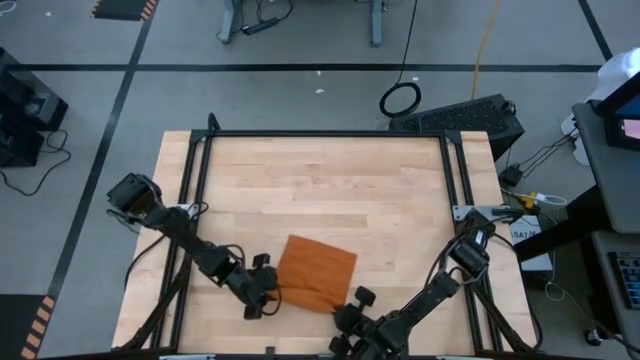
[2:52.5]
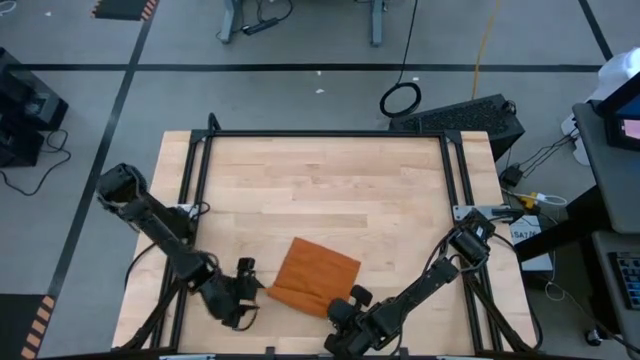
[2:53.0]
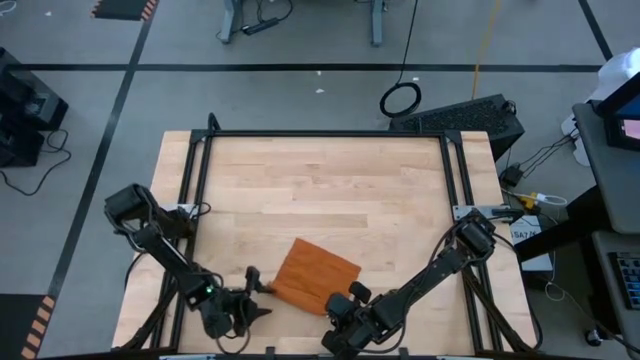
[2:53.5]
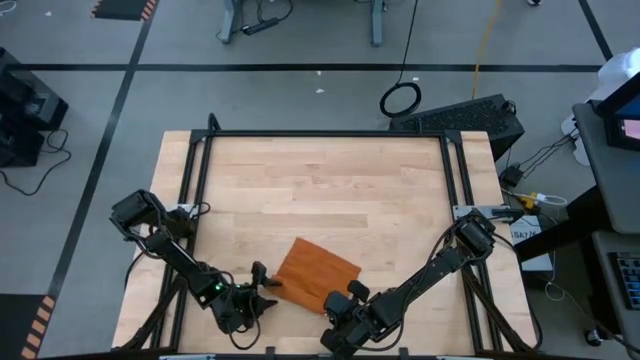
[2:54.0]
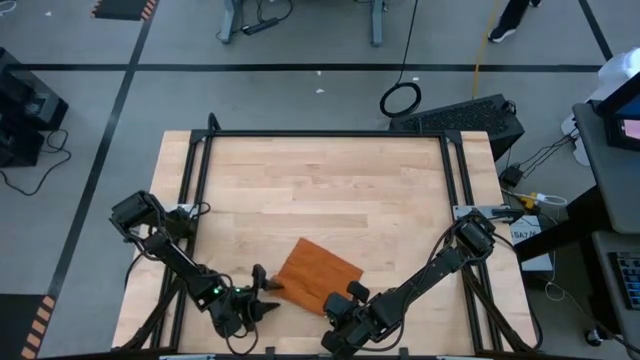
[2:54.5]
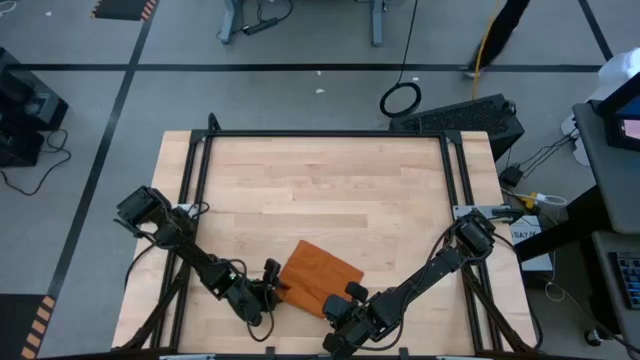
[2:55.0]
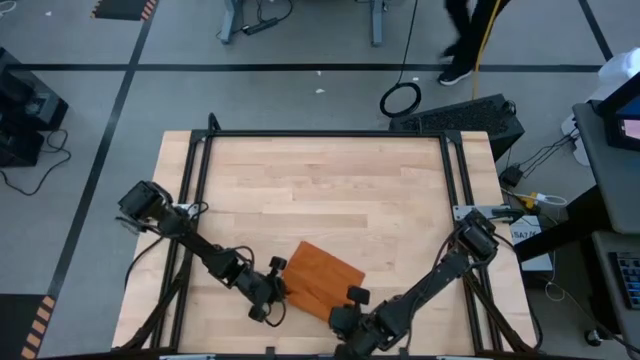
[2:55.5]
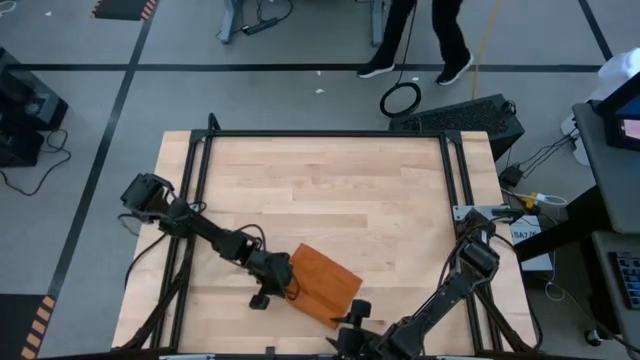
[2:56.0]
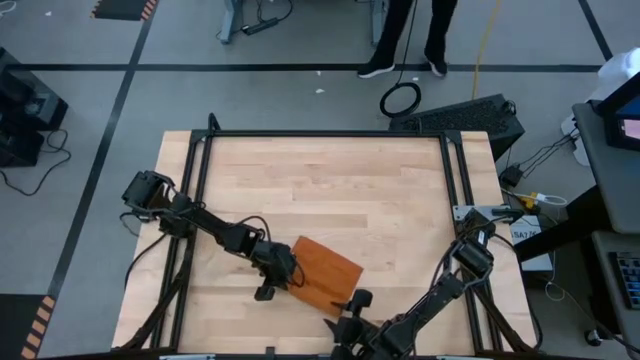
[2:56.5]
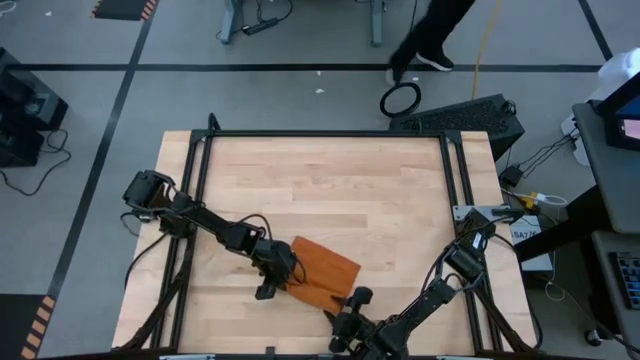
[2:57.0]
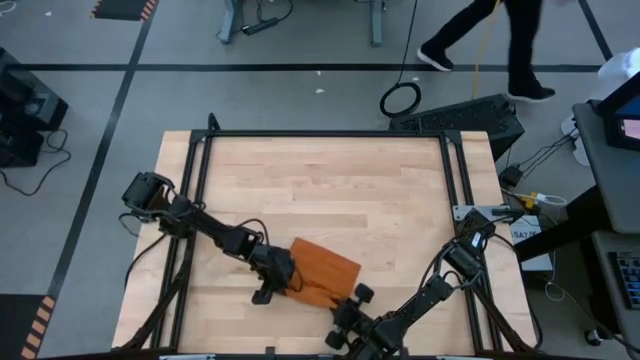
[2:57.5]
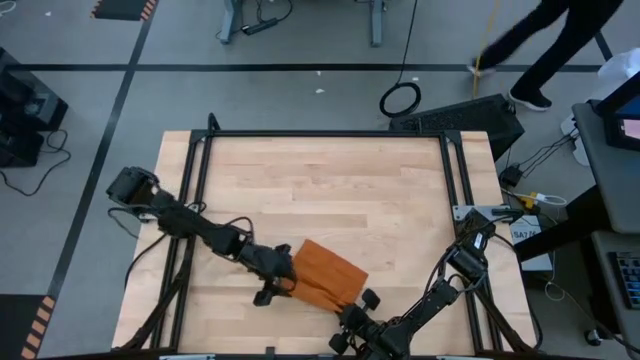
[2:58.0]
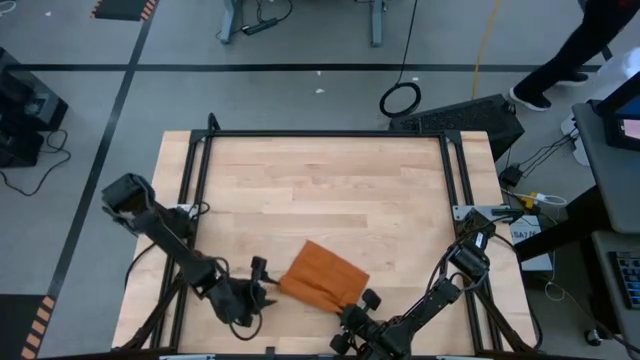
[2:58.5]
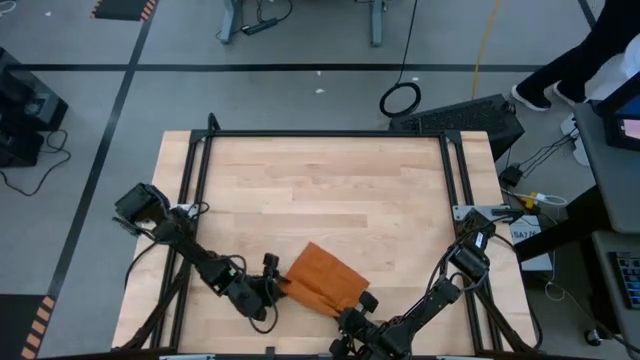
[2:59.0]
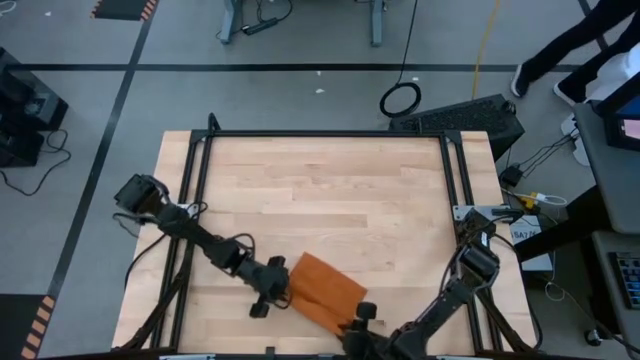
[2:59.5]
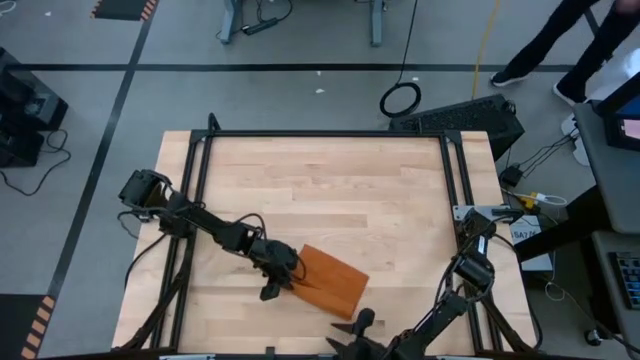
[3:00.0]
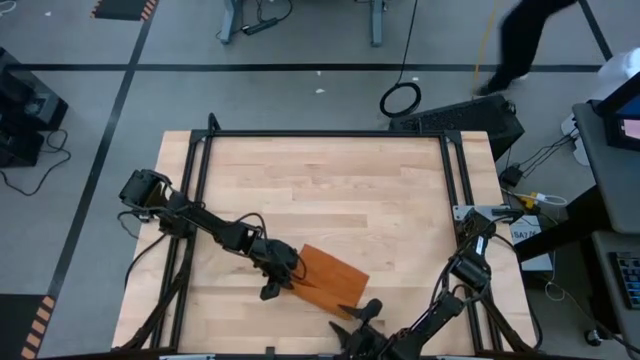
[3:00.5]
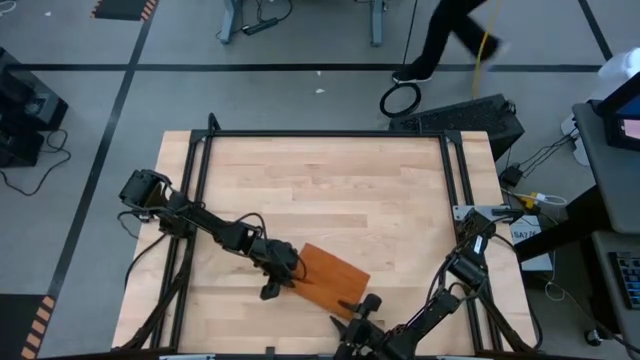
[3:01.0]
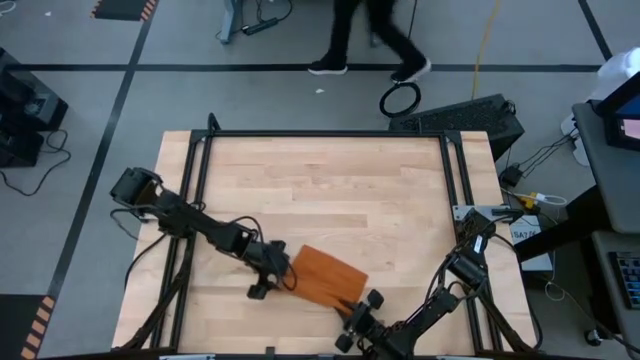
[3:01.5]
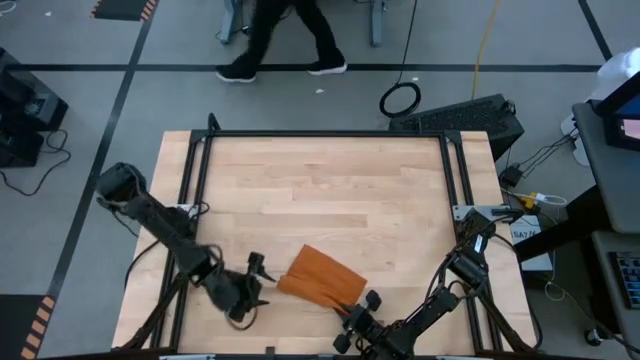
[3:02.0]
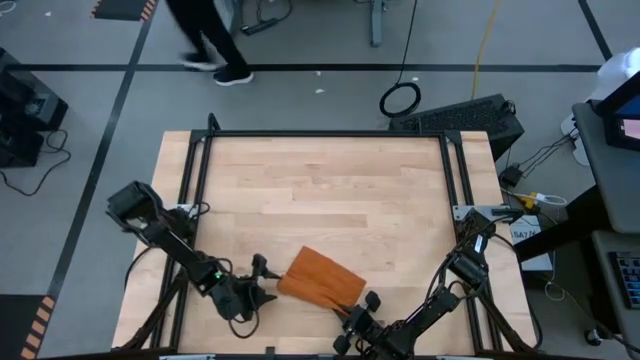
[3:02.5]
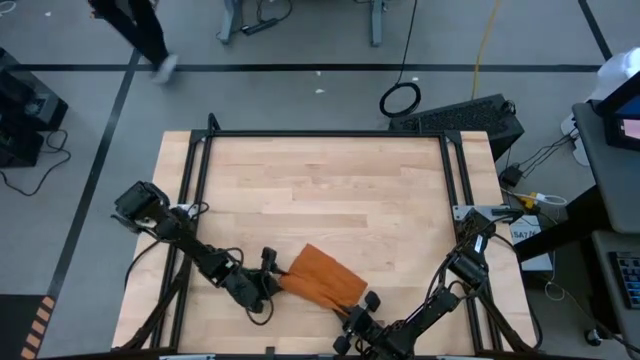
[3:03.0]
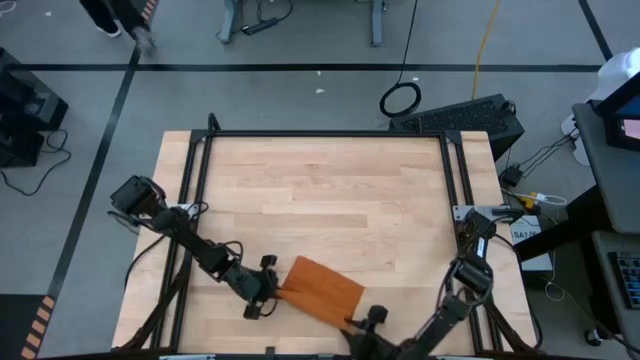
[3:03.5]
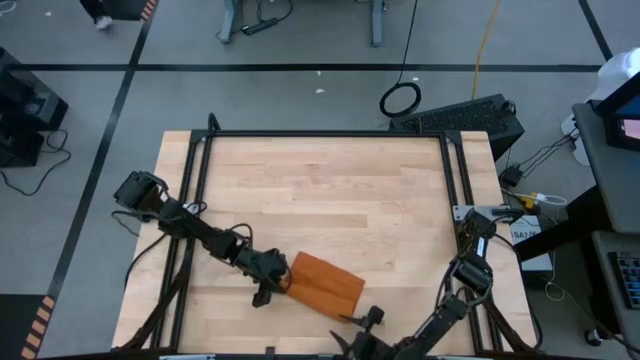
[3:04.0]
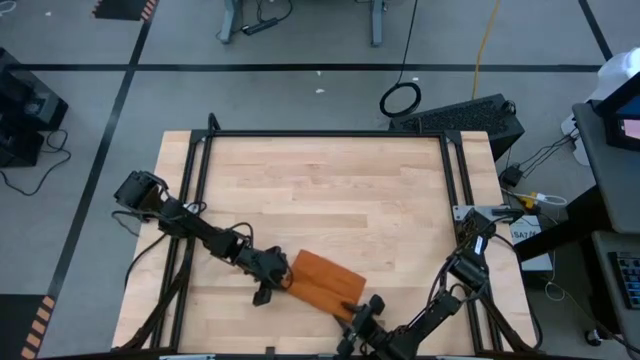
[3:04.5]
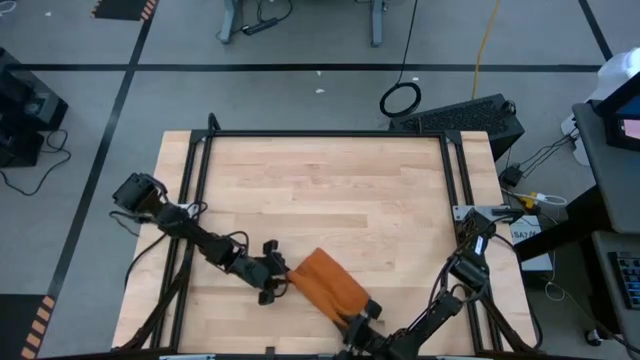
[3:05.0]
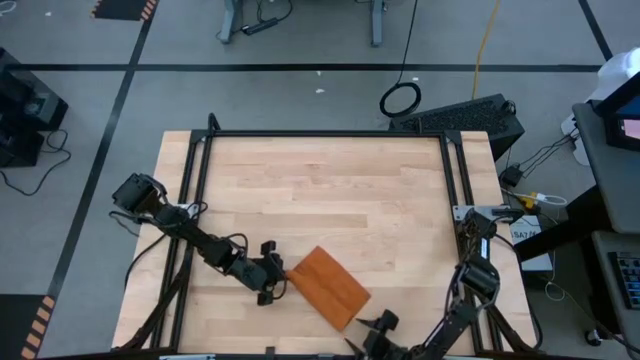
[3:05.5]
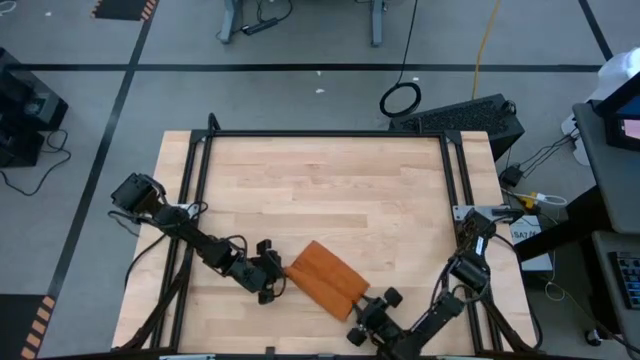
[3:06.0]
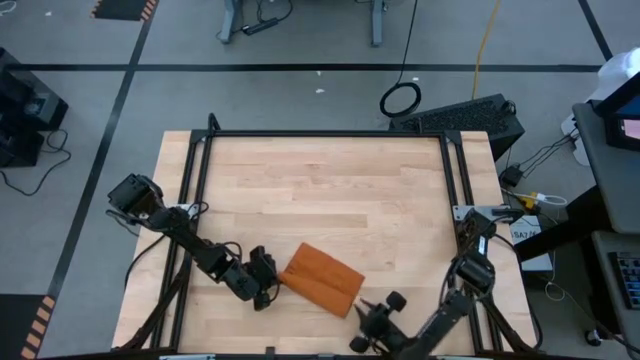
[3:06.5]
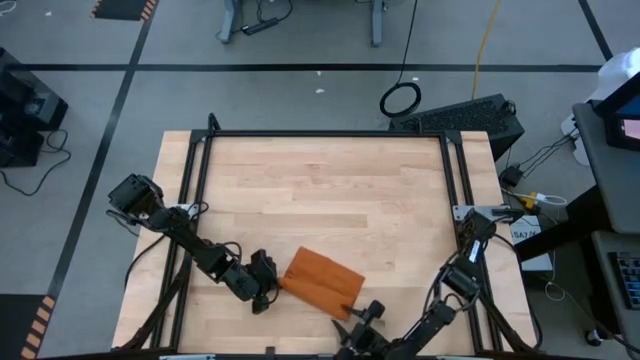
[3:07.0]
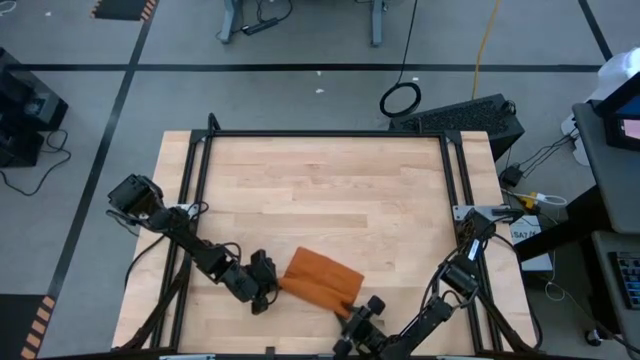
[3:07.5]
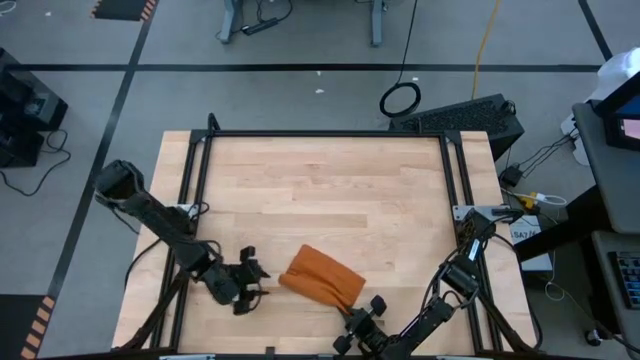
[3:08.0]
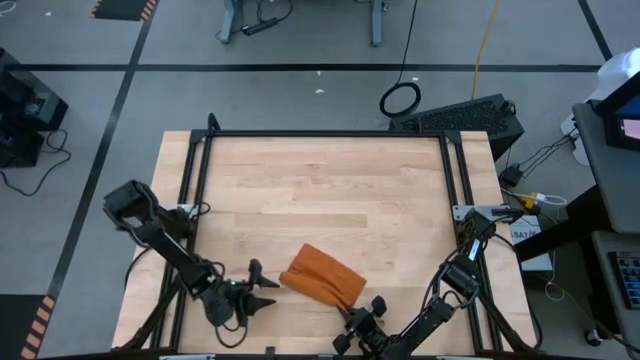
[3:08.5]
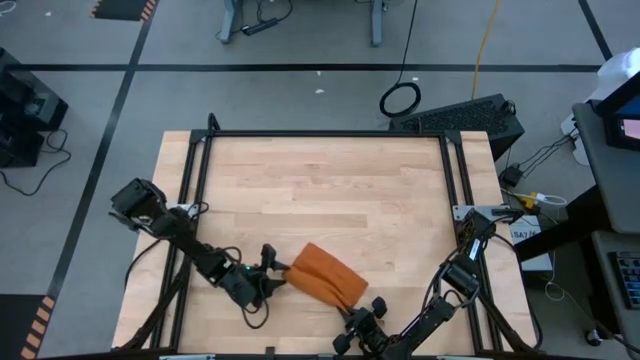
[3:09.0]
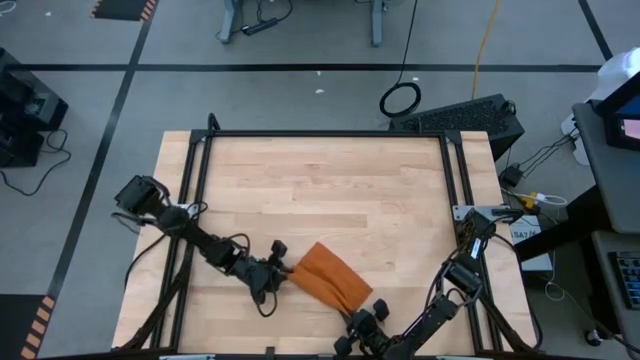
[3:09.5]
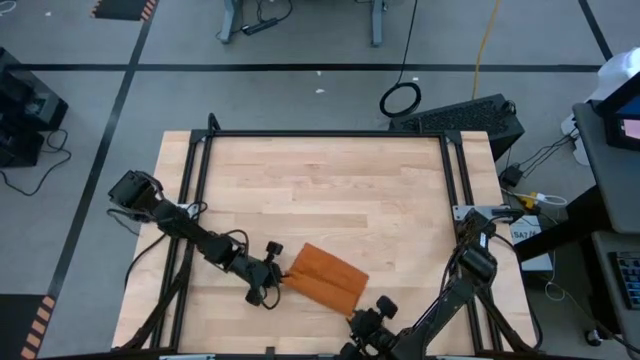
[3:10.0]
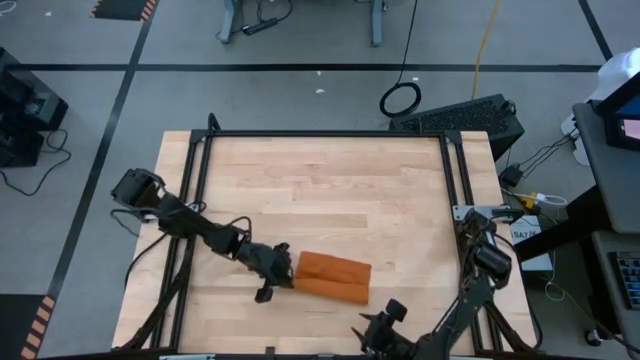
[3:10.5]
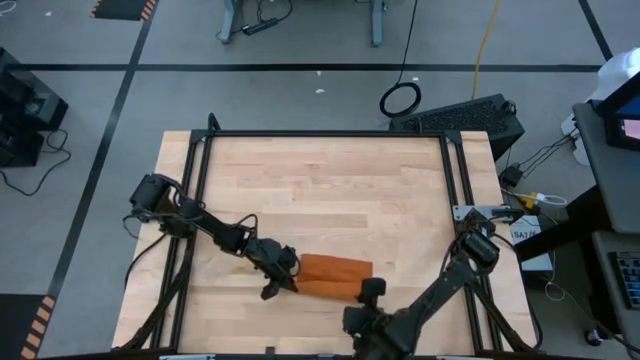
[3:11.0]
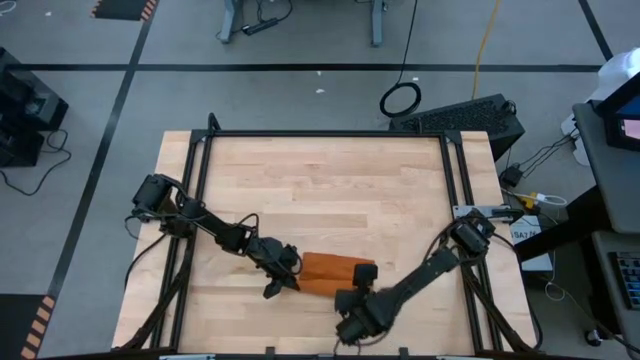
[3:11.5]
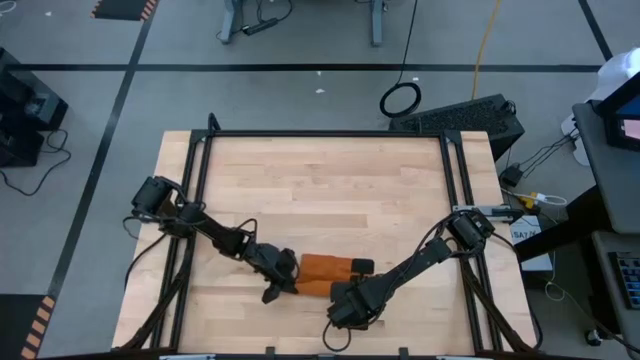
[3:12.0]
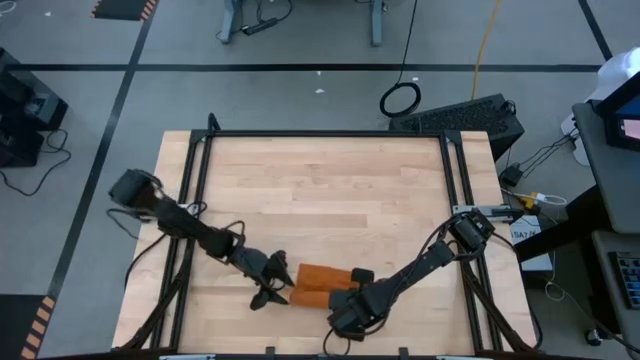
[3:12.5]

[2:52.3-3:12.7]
Task: Roll towel into tight, uniform cylinder
Roll the brown towel
